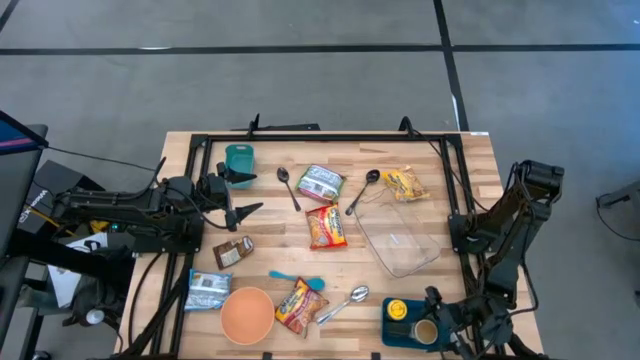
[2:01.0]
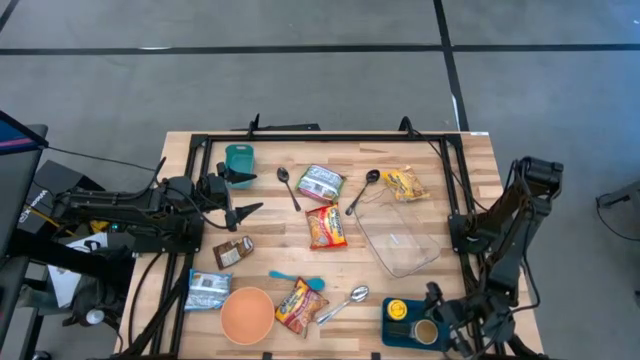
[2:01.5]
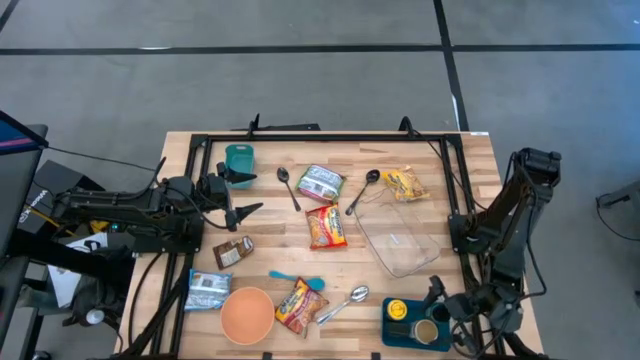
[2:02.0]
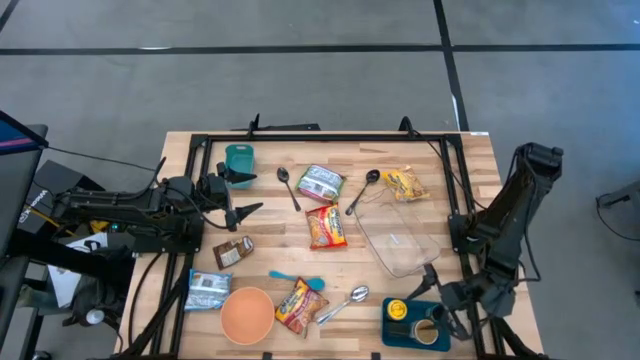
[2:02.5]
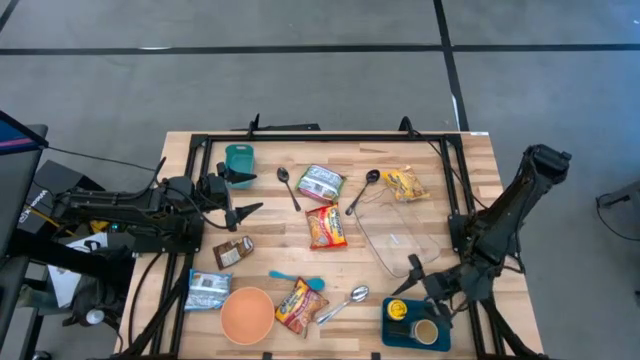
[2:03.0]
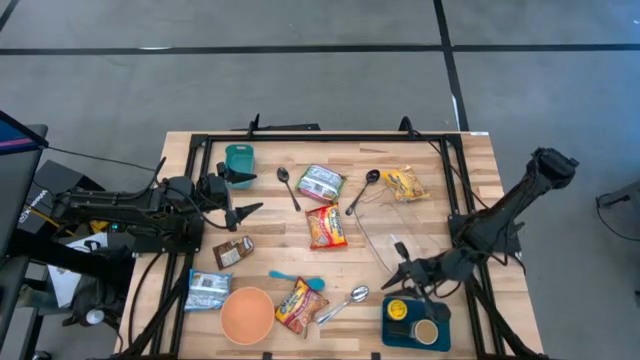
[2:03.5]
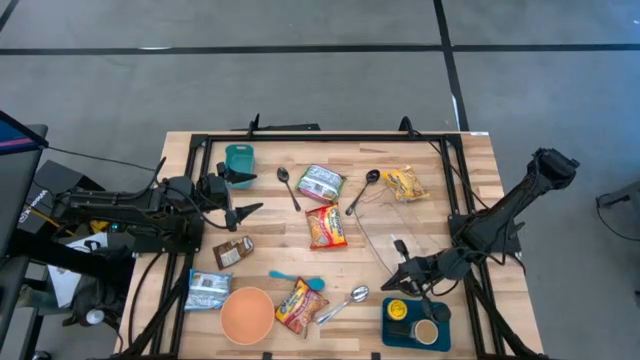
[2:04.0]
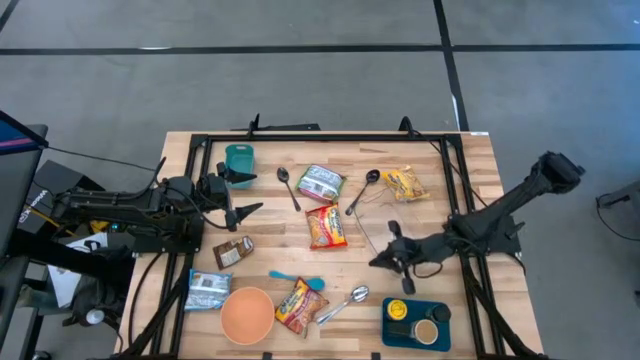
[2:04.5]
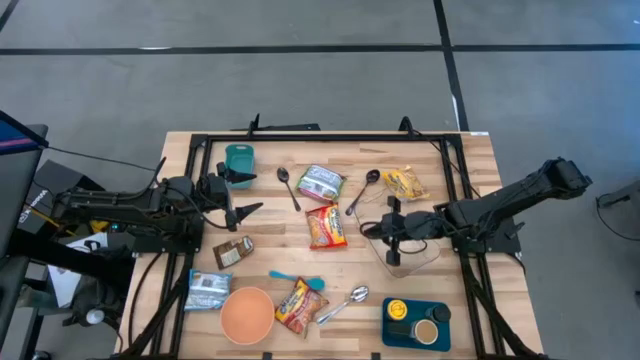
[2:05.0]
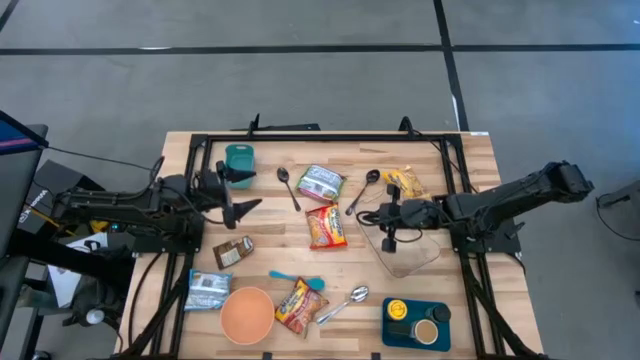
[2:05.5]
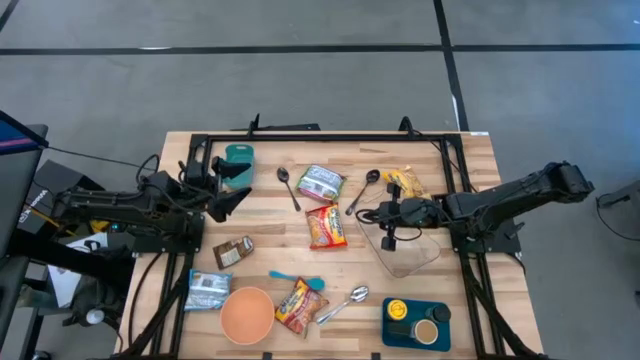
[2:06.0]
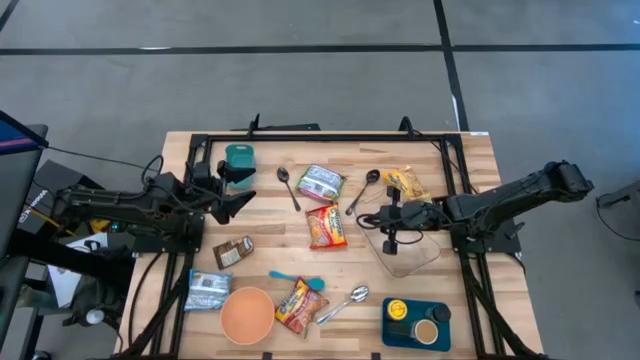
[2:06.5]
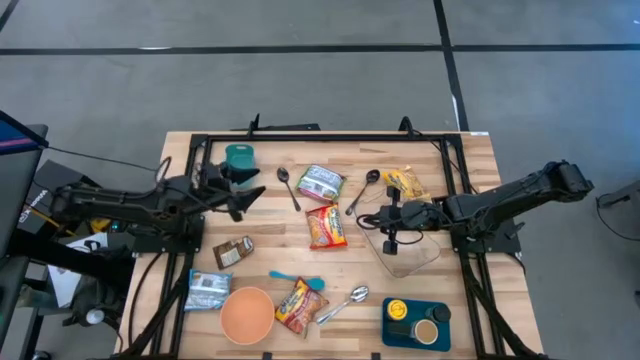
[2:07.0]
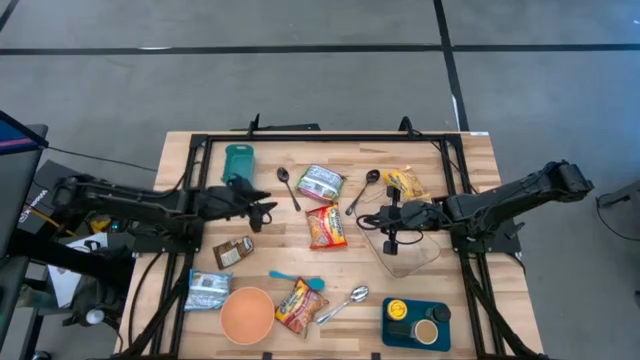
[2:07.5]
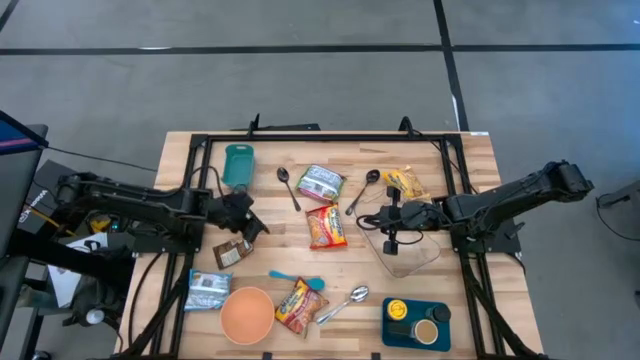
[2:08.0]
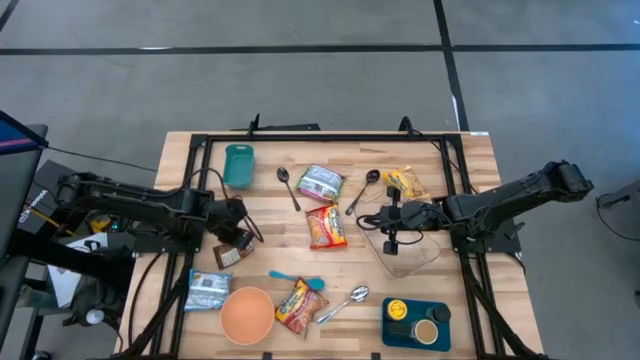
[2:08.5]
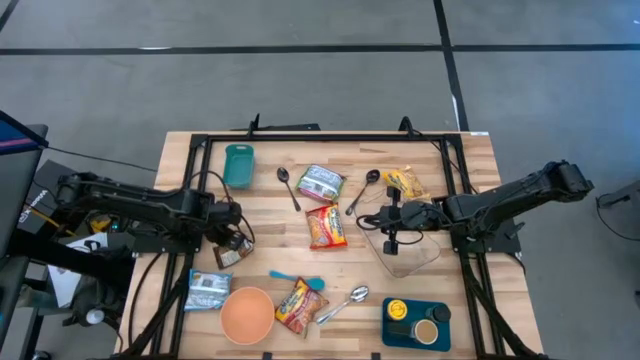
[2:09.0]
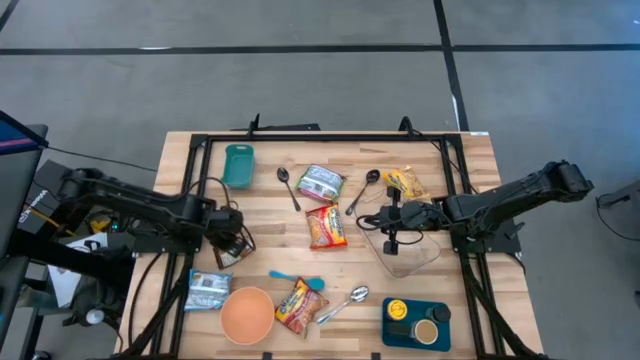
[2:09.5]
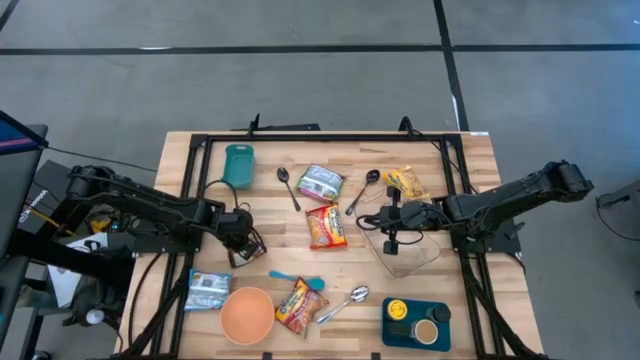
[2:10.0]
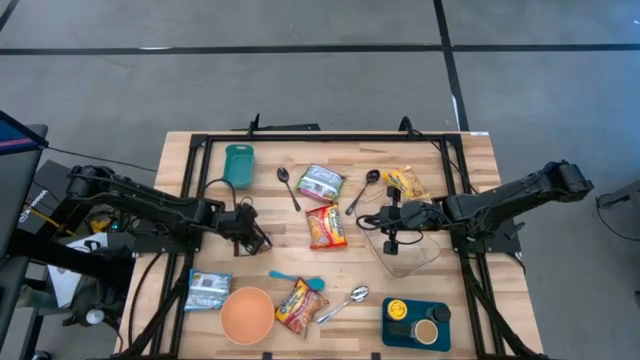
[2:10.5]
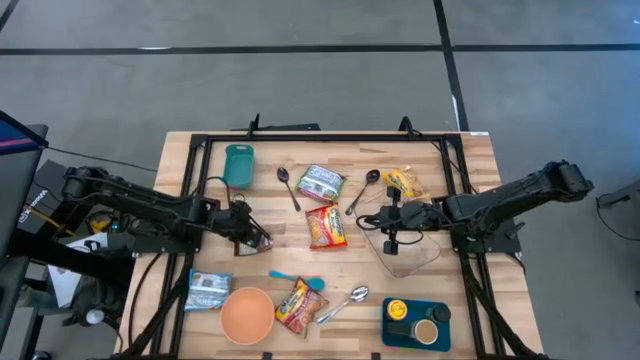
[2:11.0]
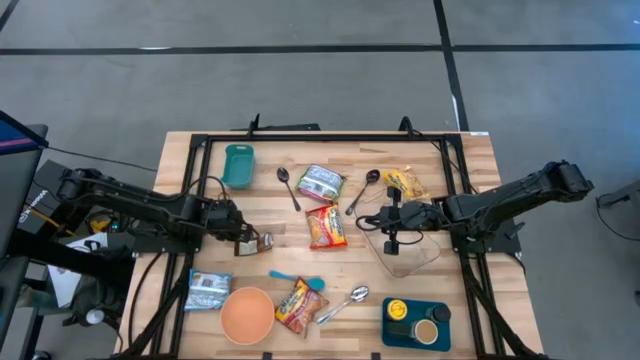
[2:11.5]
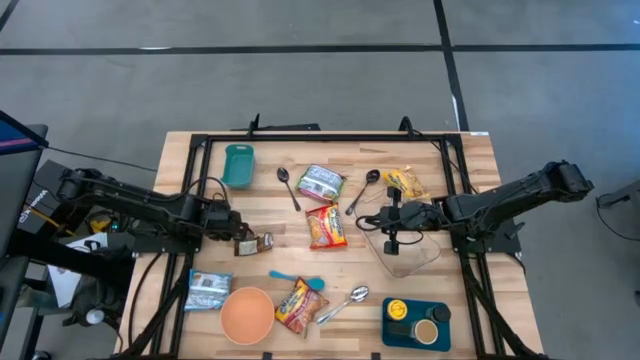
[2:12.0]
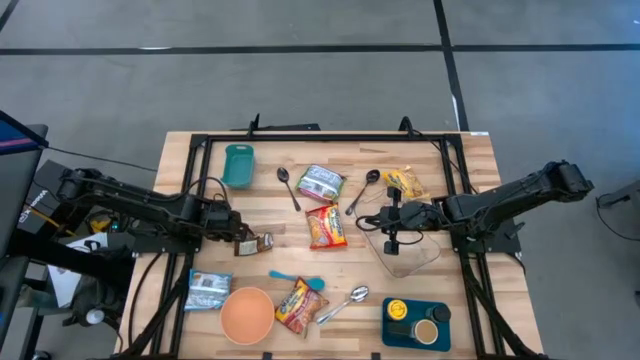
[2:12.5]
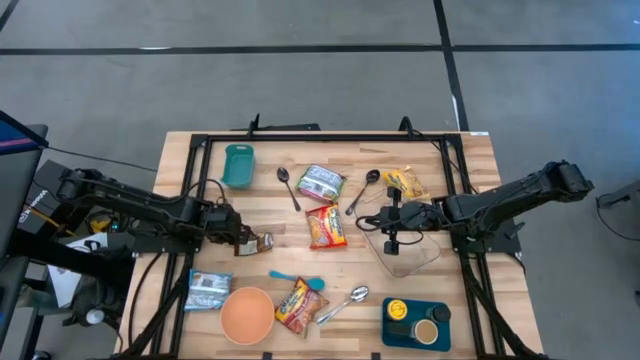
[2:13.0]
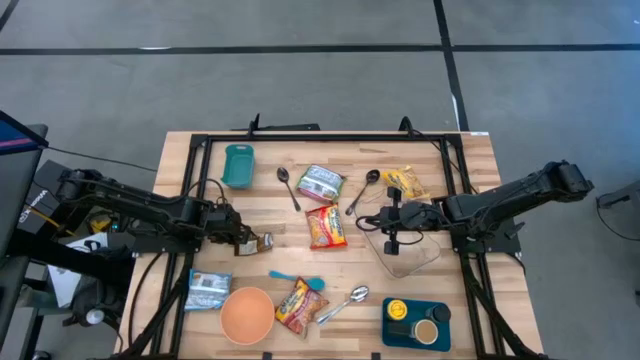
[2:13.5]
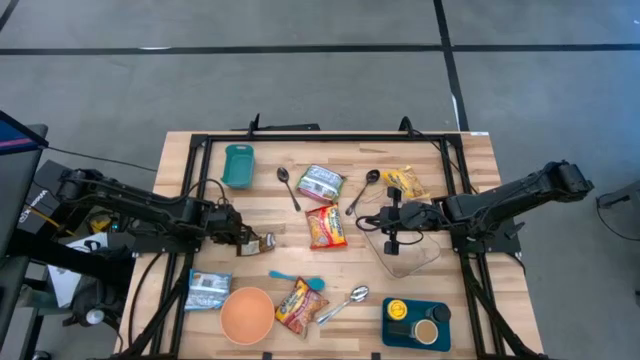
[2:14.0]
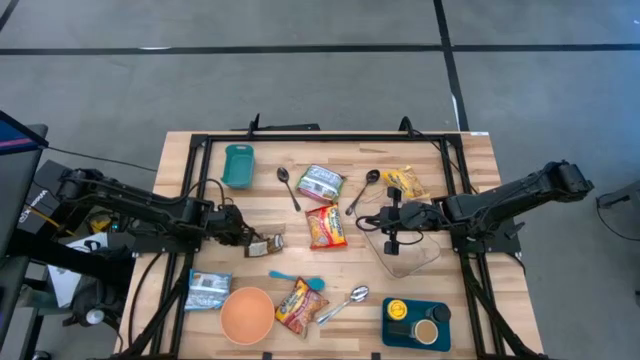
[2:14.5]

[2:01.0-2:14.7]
Task: Pick & Place Food Item
Put the orange spice pack into the blue bin

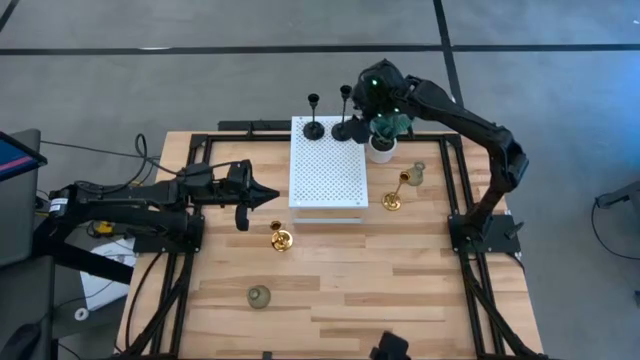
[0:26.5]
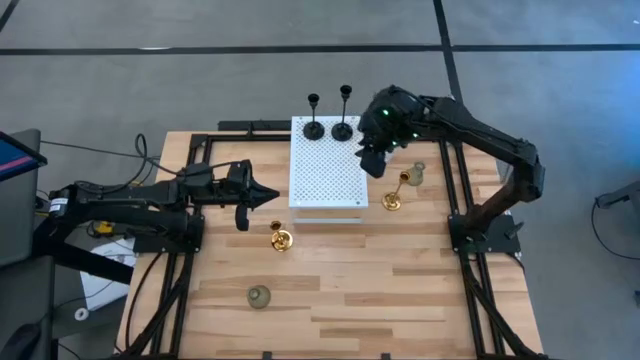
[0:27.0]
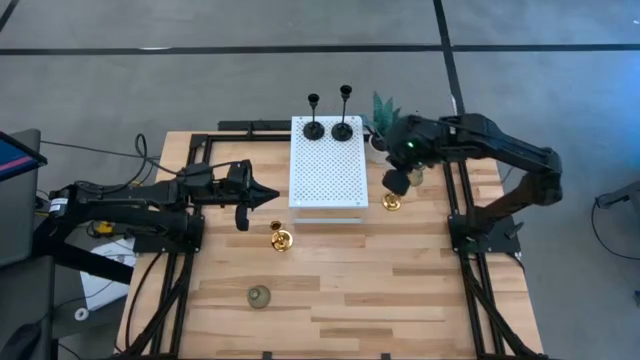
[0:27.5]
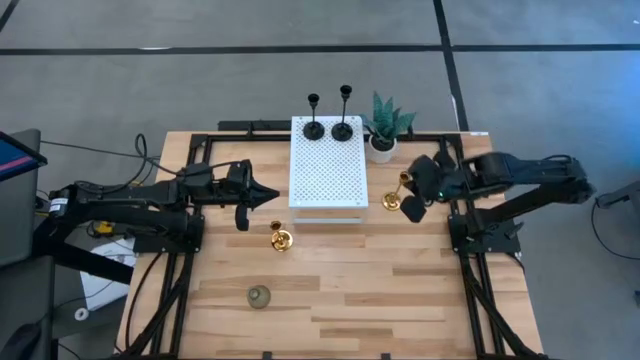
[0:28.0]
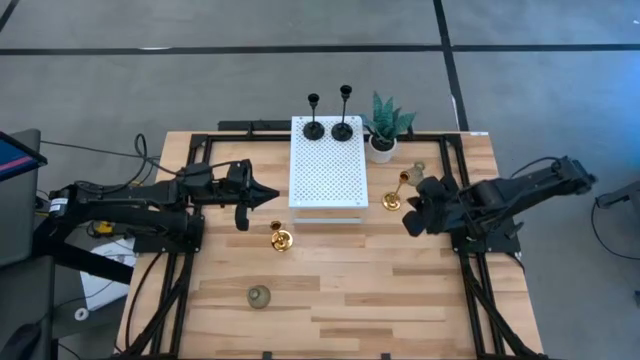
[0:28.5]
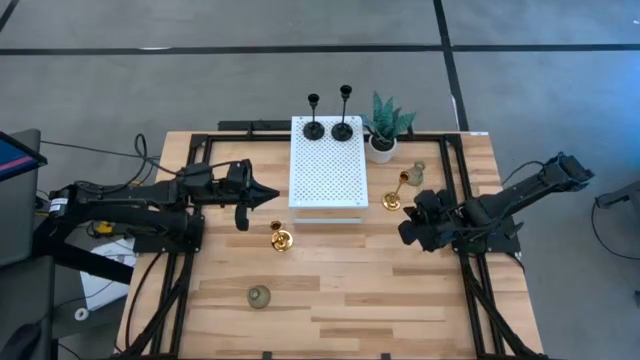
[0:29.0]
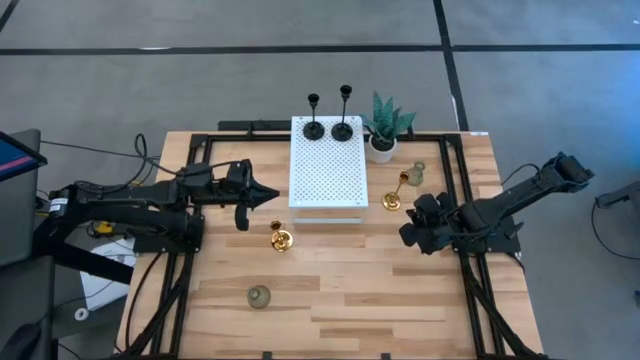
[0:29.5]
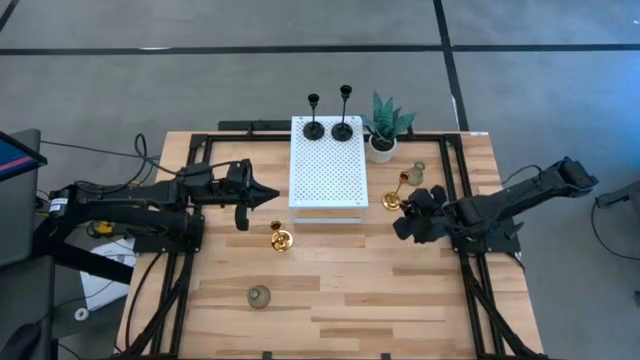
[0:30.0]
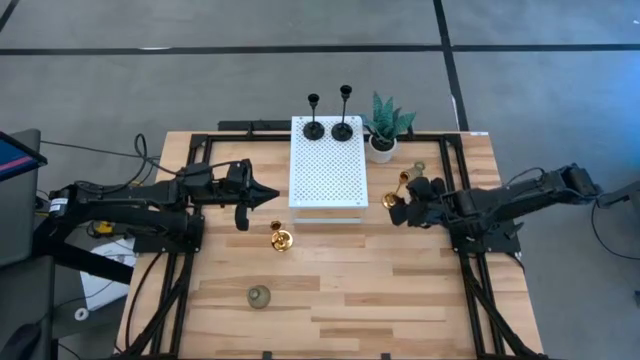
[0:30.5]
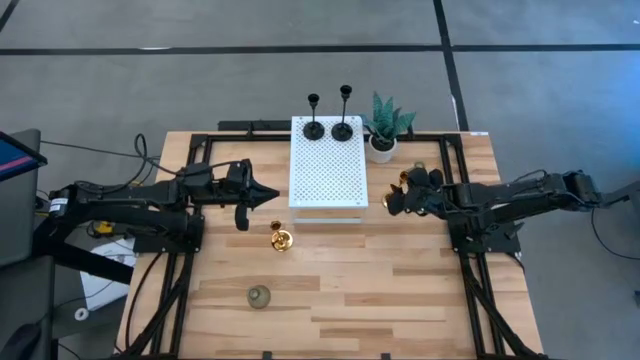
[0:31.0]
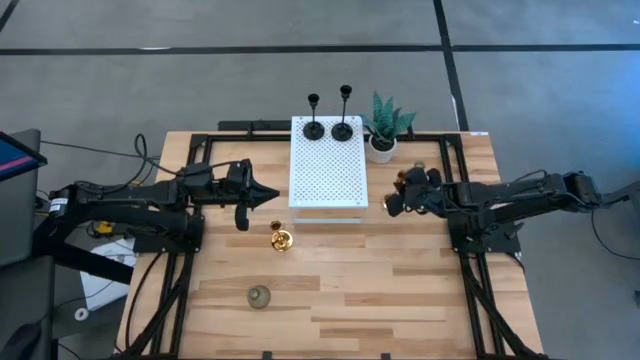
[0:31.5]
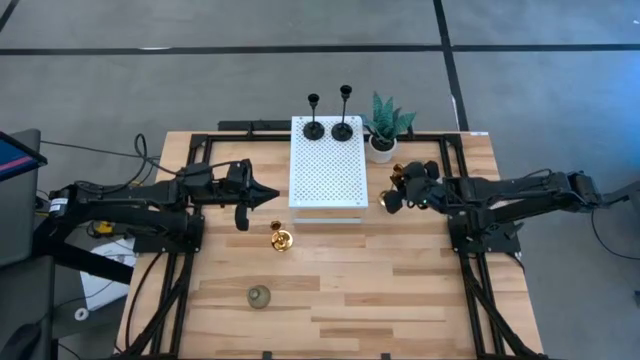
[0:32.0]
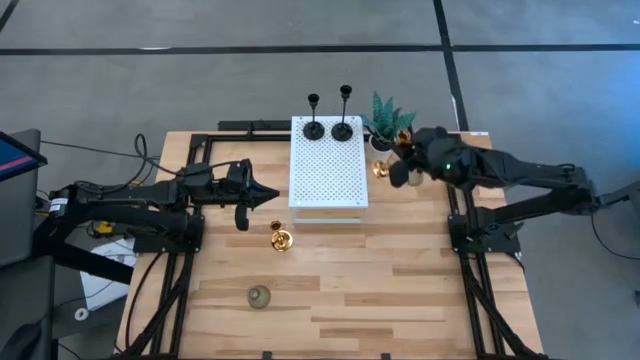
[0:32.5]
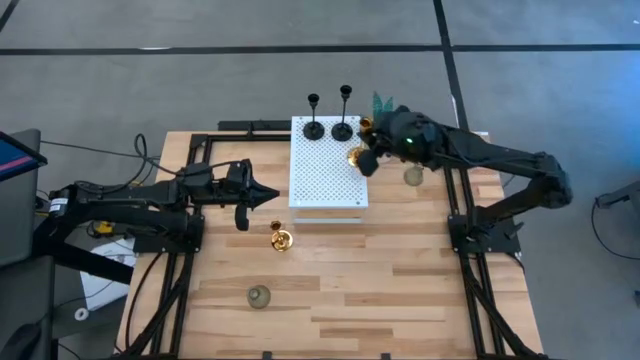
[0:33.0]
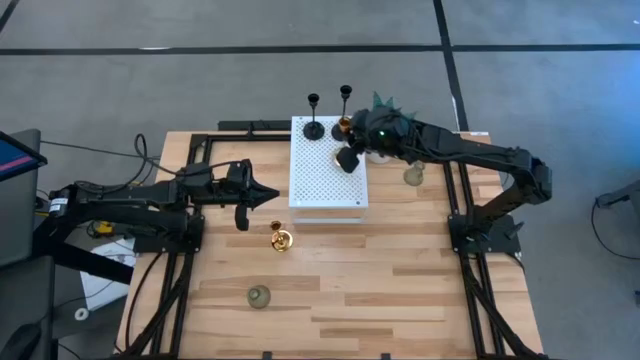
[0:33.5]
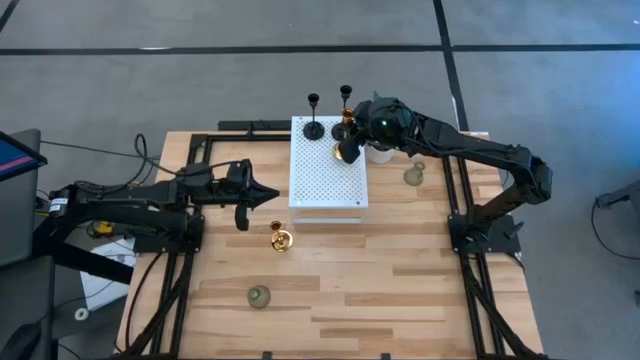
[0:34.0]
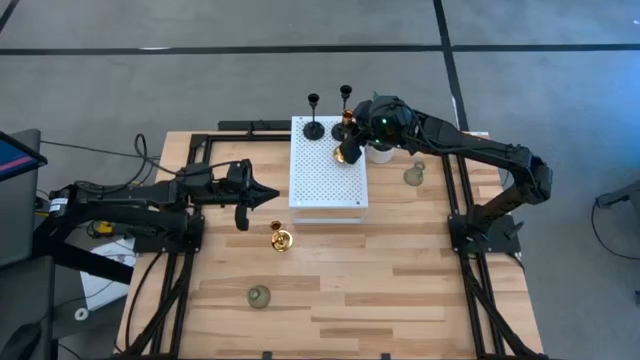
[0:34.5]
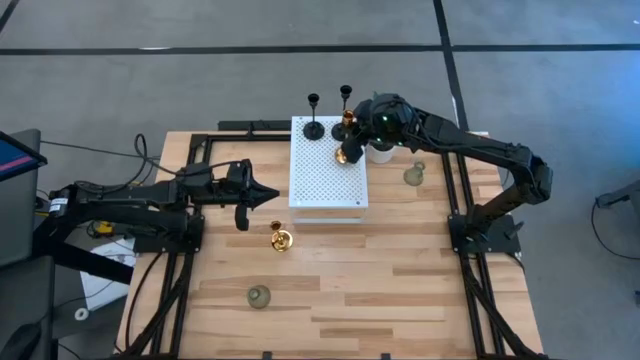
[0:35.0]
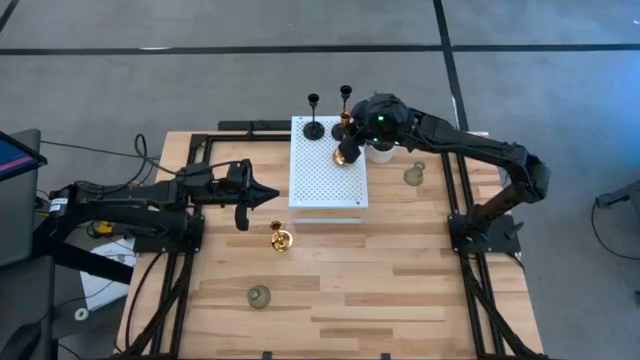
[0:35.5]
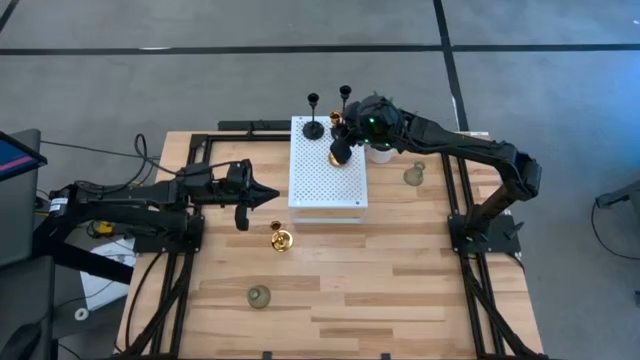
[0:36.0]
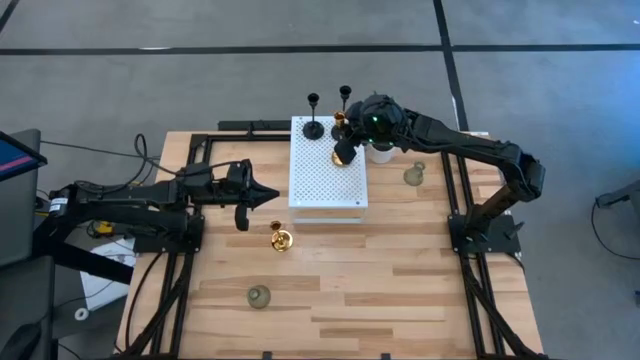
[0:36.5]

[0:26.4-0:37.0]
Task: Pick & Place candle stick holders
Put the right golden candle holder on the shelf
